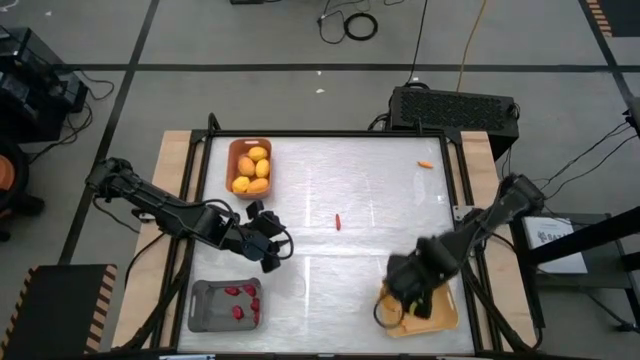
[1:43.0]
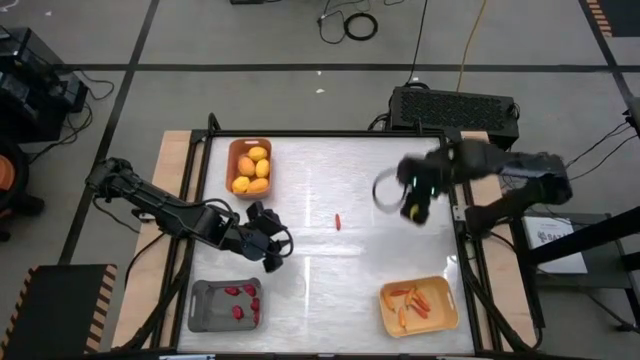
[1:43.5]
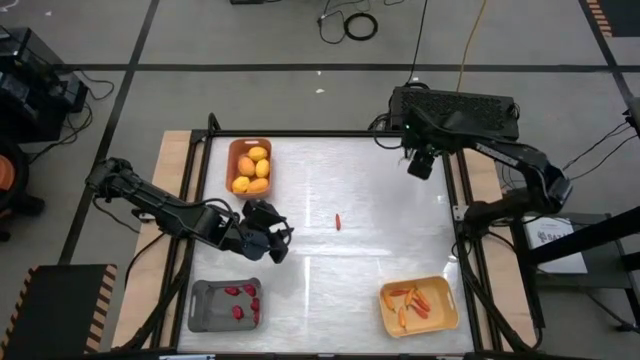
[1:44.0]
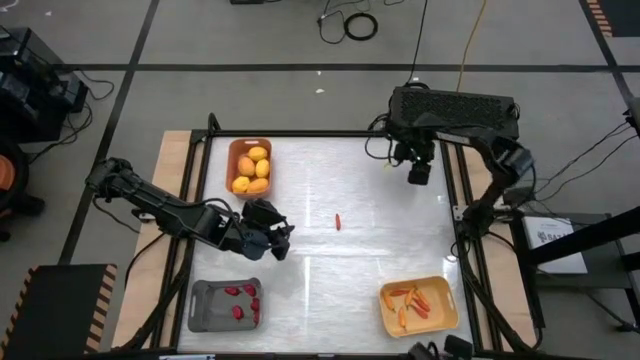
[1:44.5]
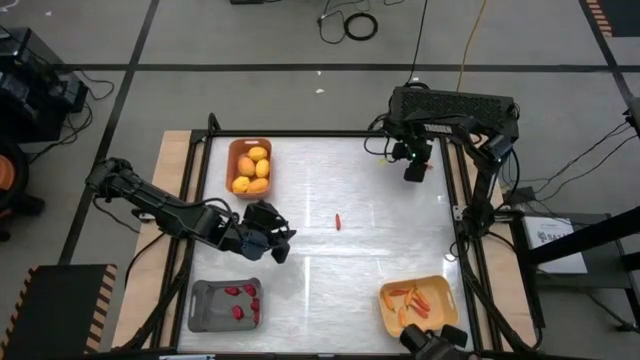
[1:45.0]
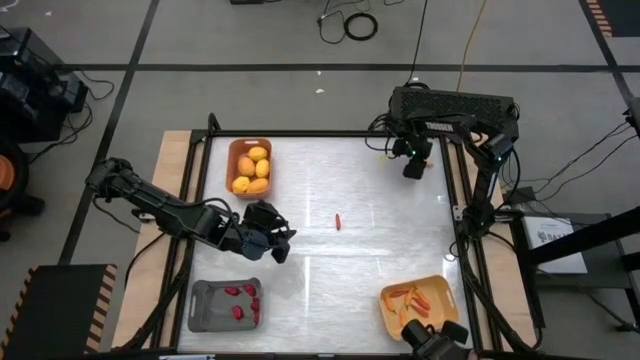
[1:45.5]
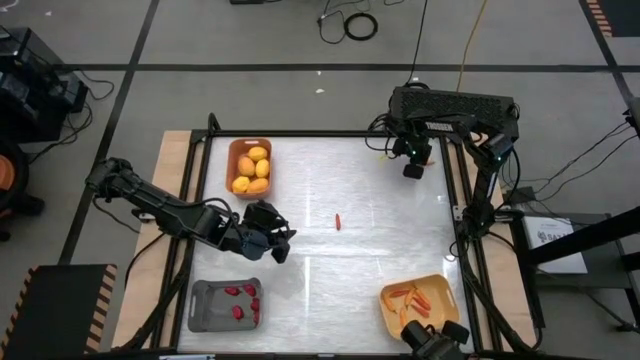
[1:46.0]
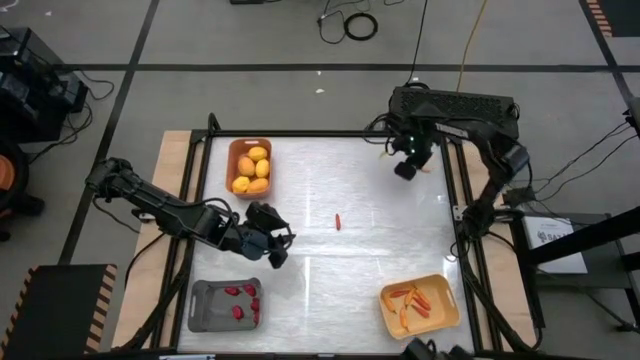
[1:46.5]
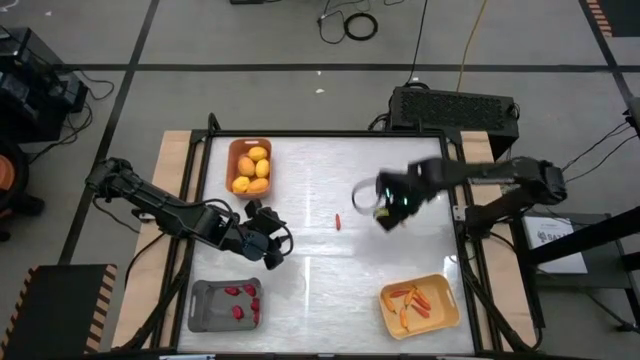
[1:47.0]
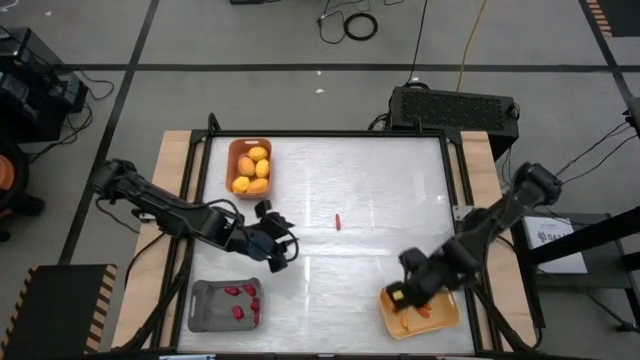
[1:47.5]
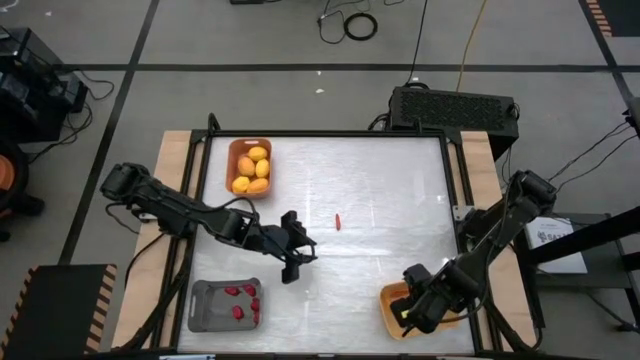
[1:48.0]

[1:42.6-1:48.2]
Task: Sort produce into baskets
Put the orange chili into the yellow bin

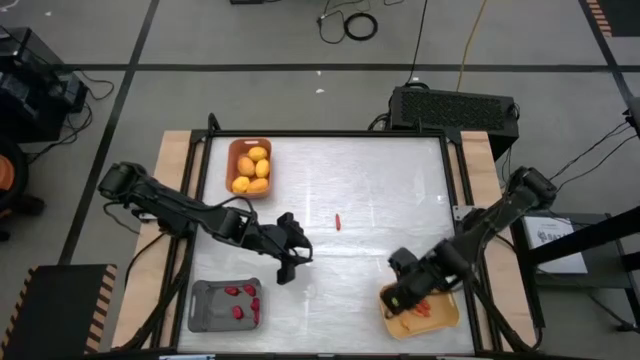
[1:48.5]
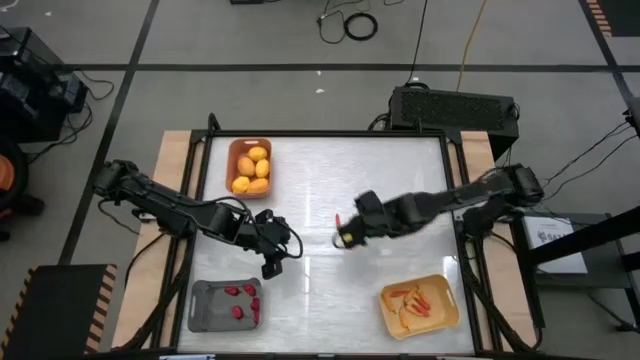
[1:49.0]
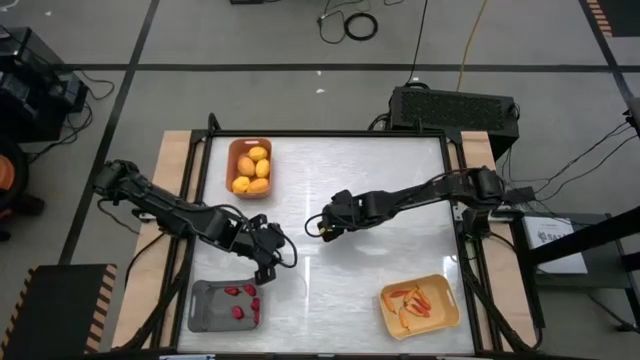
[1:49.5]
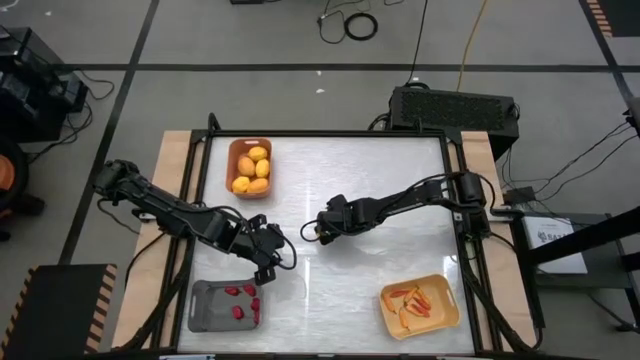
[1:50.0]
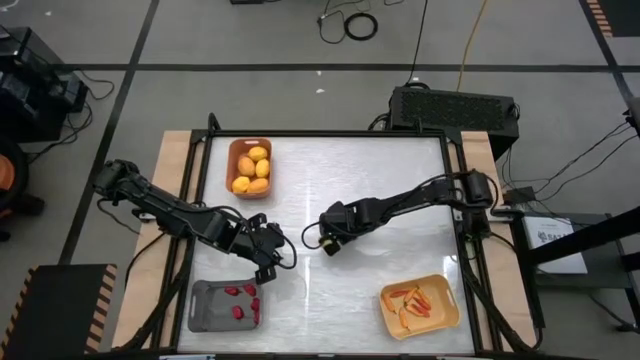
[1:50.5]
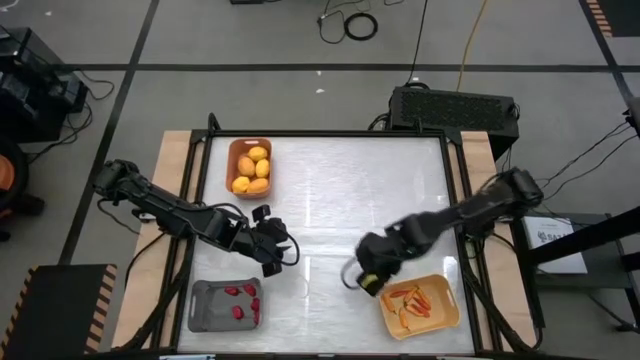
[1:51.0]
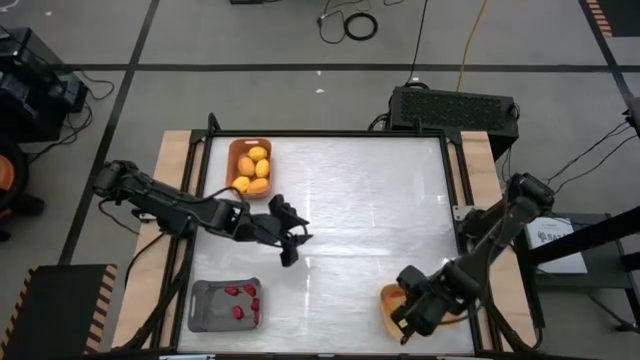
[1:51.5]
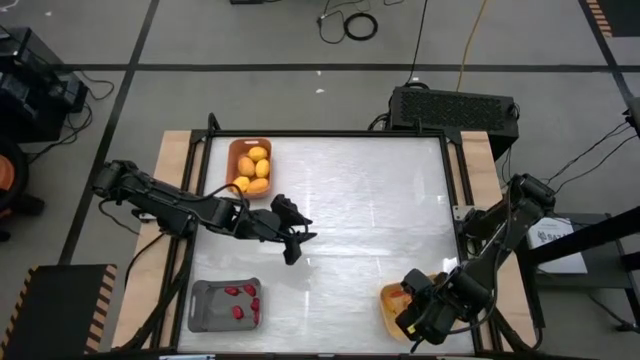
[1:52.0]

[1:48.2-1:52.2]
Put the red chili into the yellow bin

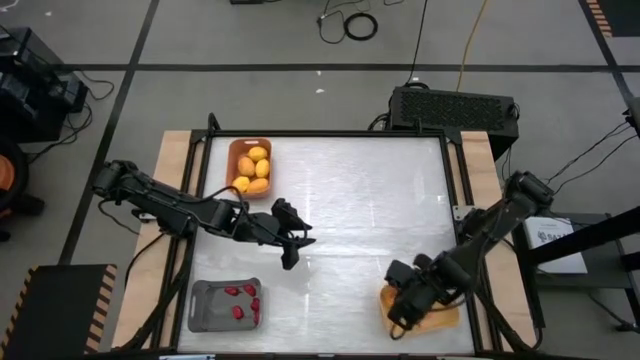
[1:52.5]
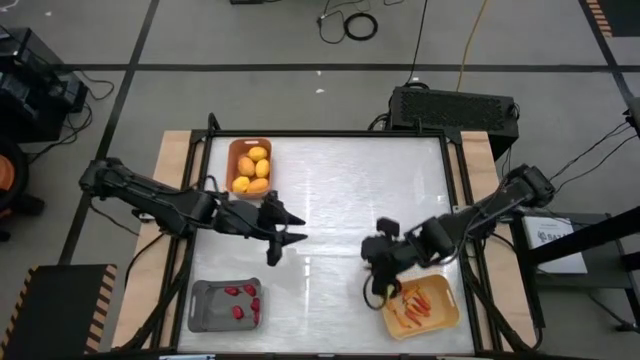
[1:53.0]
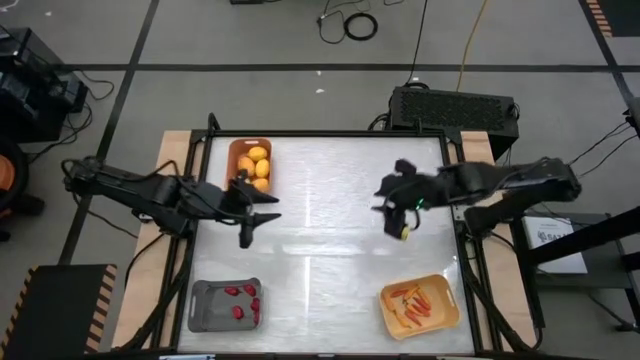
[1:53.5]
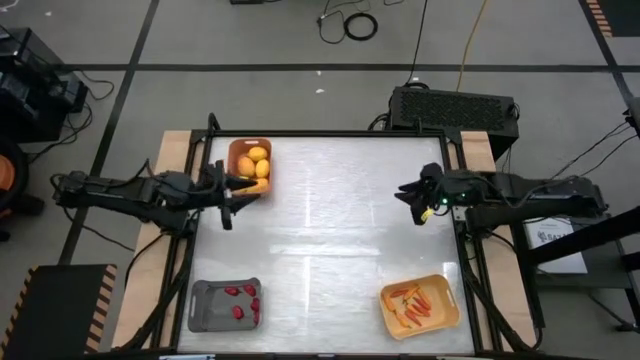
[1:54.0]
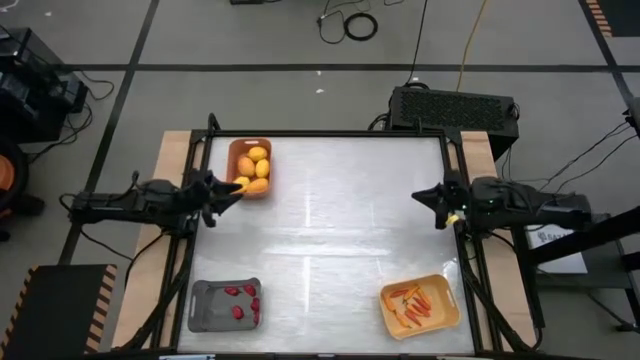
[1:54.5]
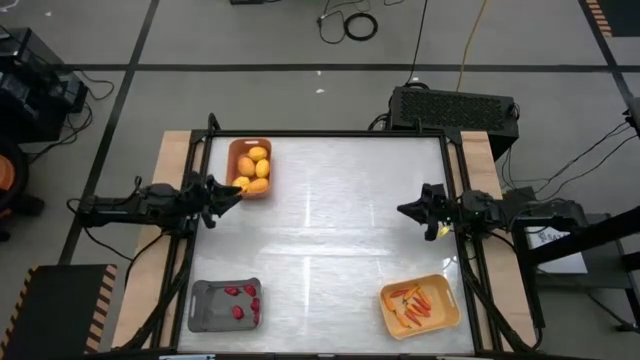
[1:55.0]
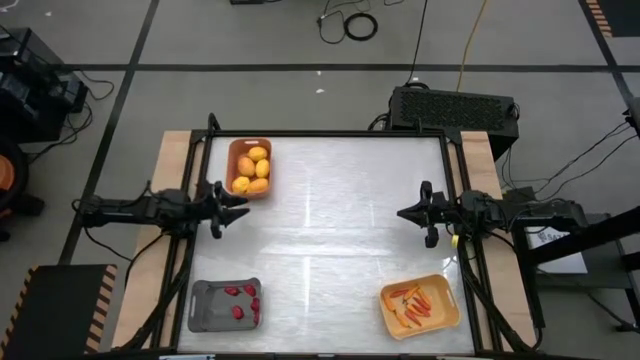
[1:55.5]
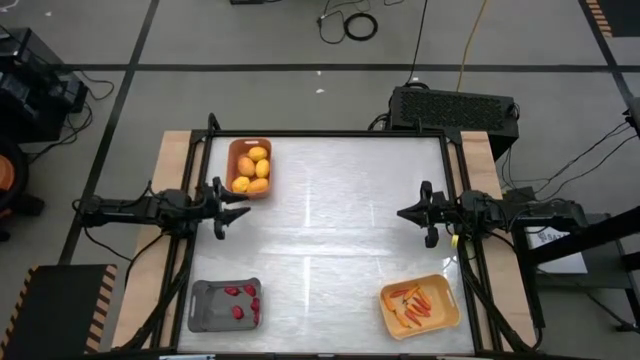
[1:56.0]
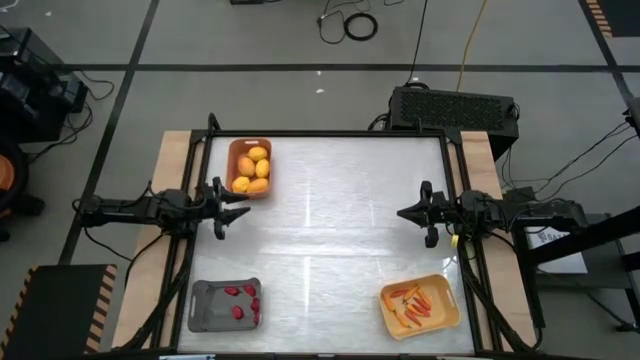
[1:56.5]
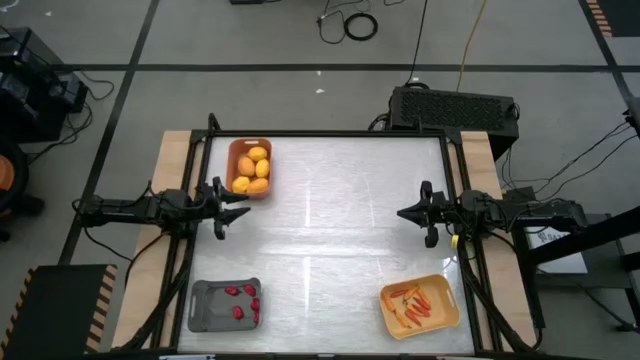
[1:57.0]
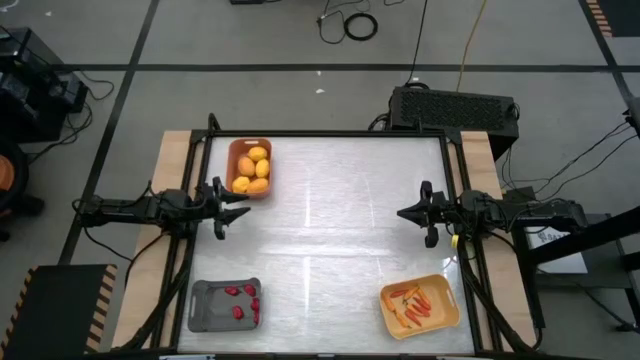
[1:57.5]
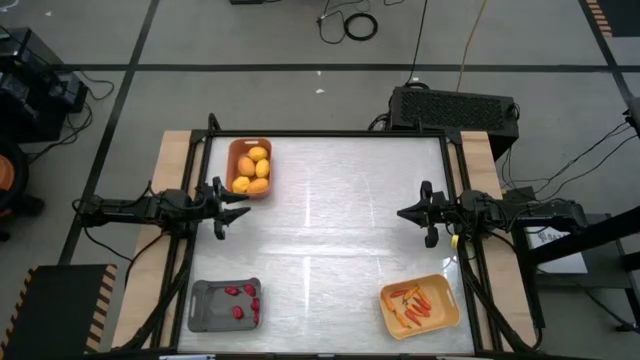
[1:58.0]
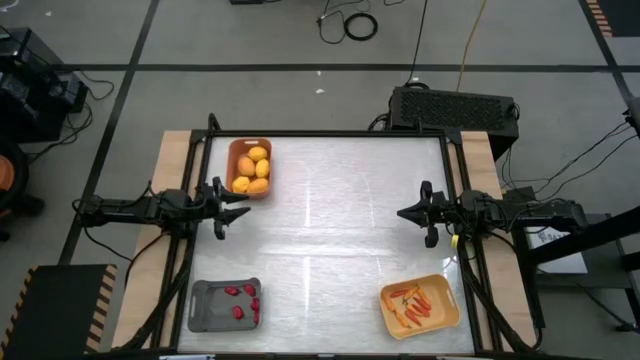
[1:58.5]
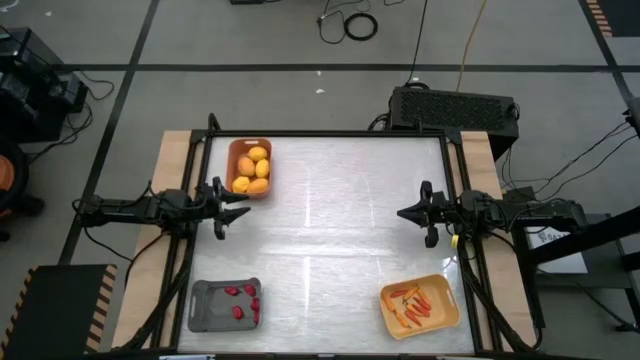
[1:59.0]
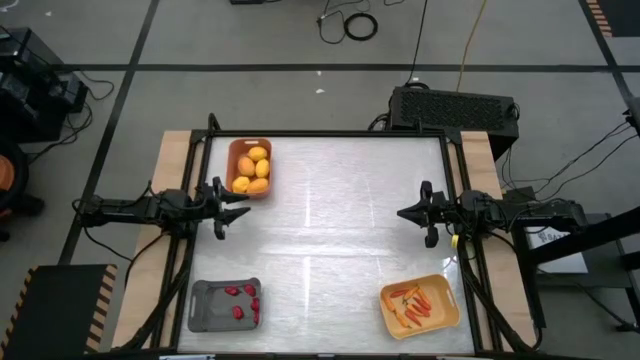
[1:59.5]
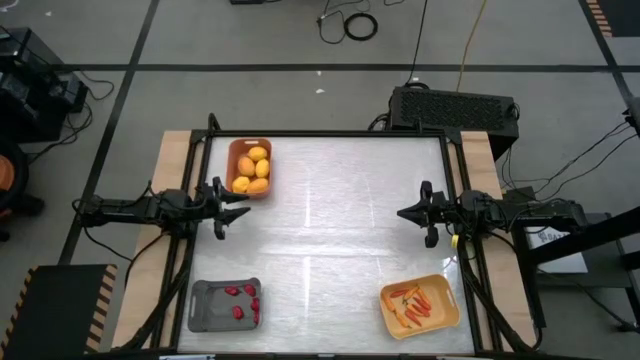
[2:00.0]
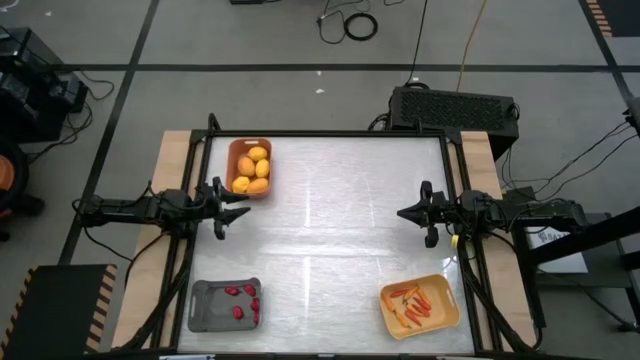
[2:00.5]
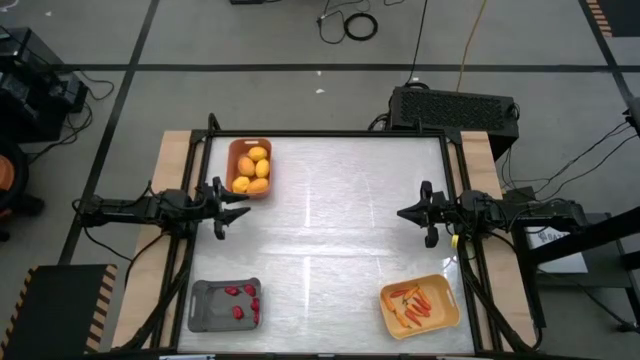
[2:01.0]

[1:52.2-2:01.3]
Return to Home Position

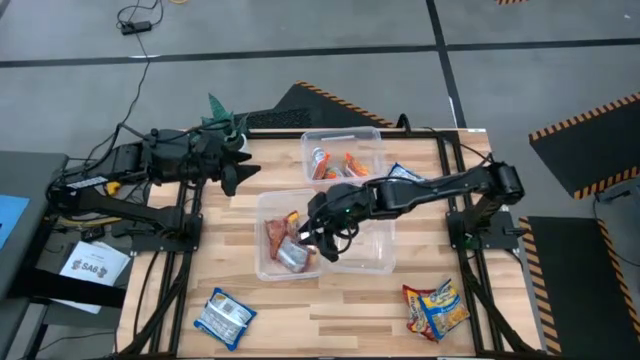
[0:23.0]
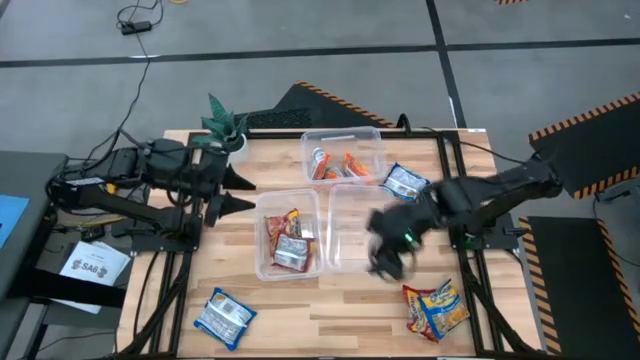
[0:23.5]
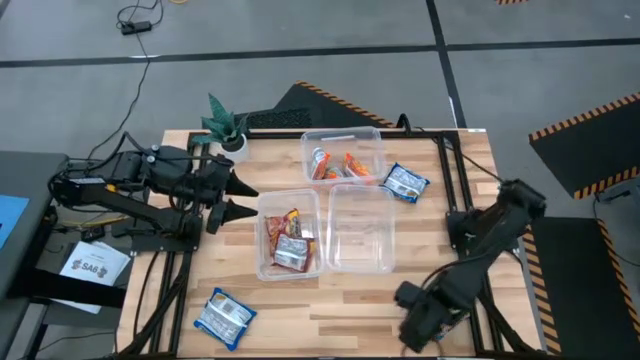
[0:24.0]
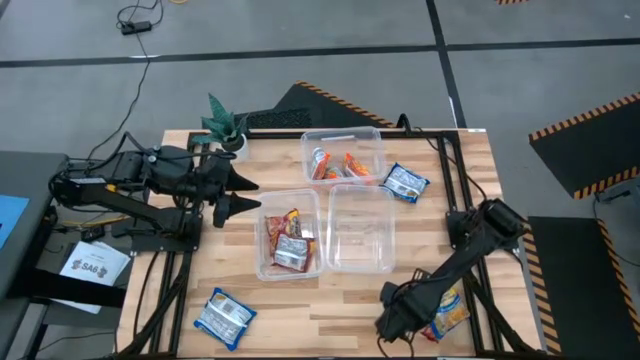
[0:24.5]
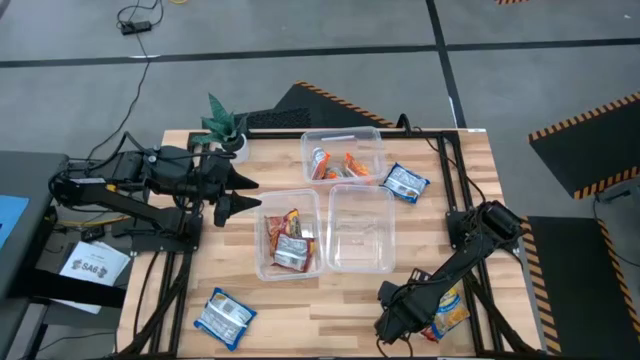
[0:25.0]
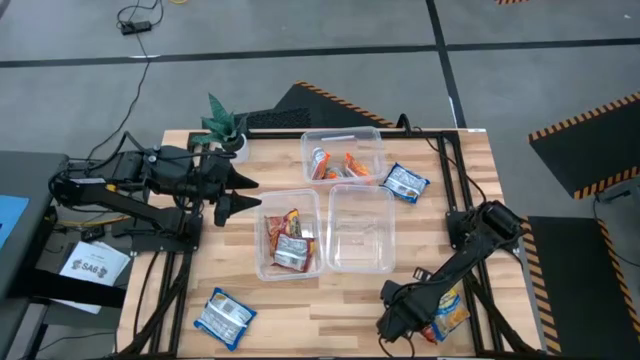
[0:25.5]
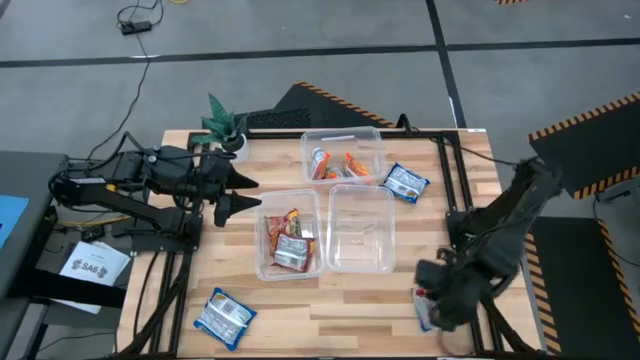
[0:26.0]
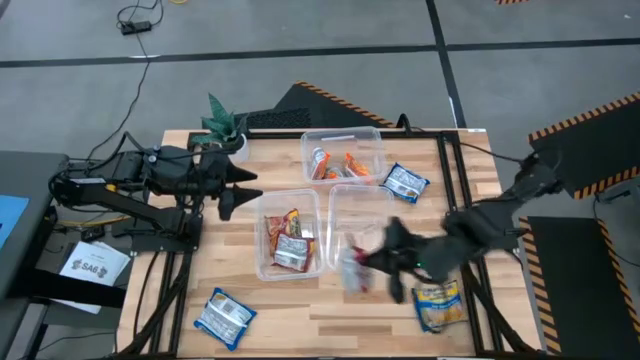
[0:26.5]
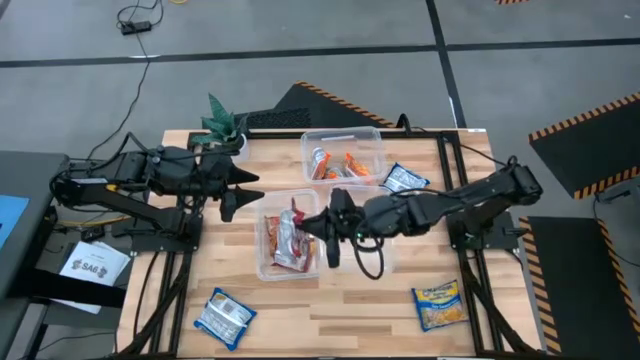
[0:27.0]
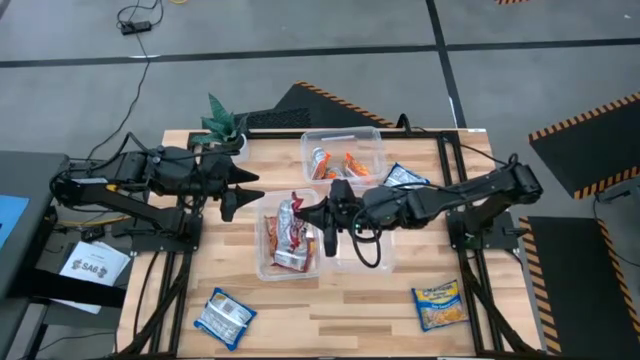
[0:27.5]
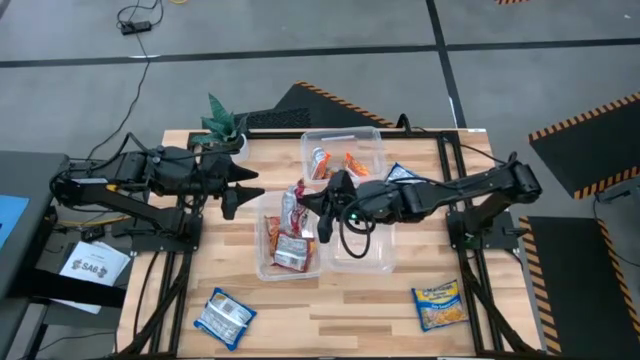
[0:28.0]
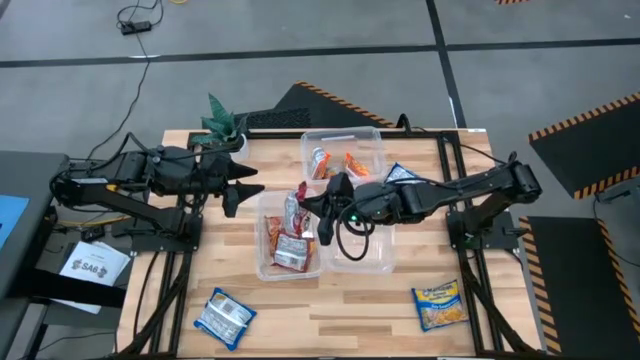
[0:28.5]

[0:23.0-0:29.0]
Task: Sort Maruchan noodles
Put the red noodle pack into the bottom left transparent bin
